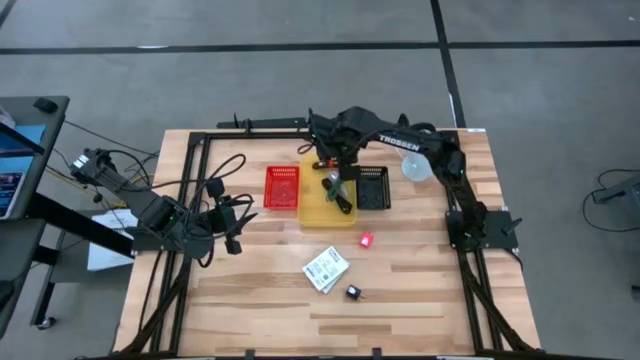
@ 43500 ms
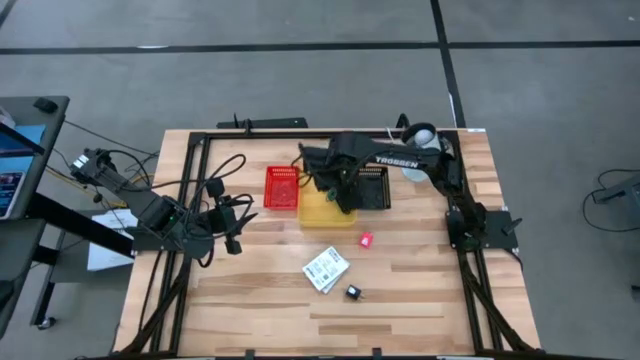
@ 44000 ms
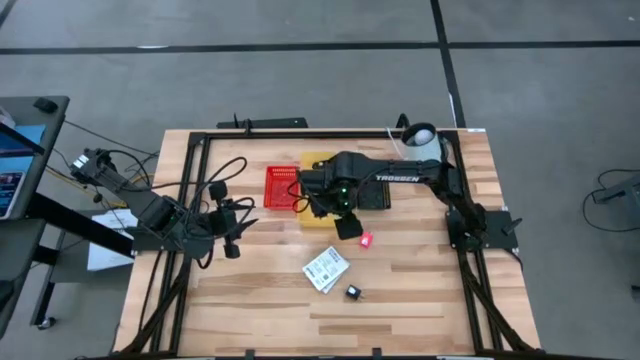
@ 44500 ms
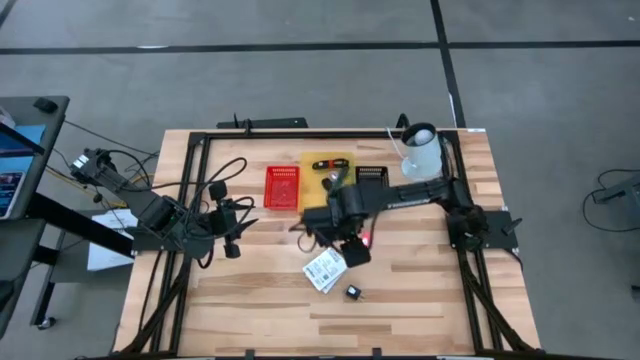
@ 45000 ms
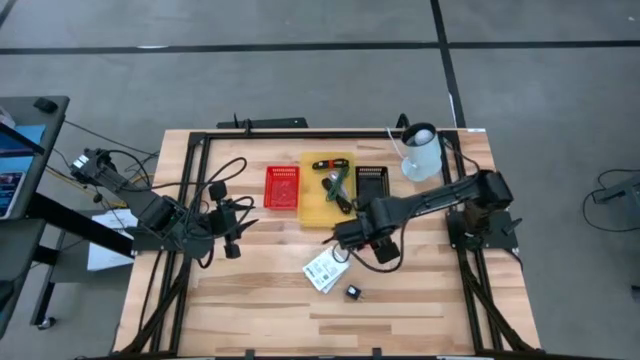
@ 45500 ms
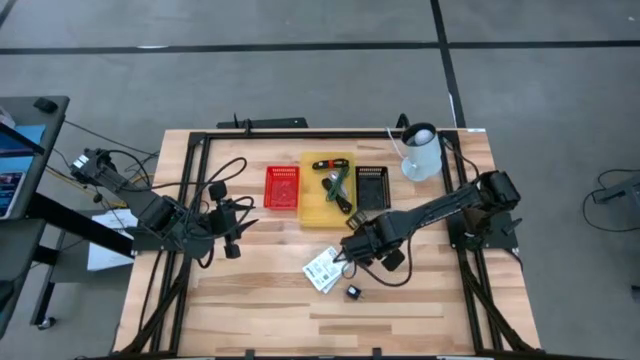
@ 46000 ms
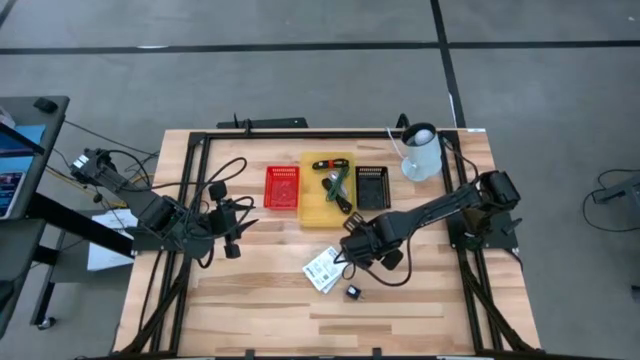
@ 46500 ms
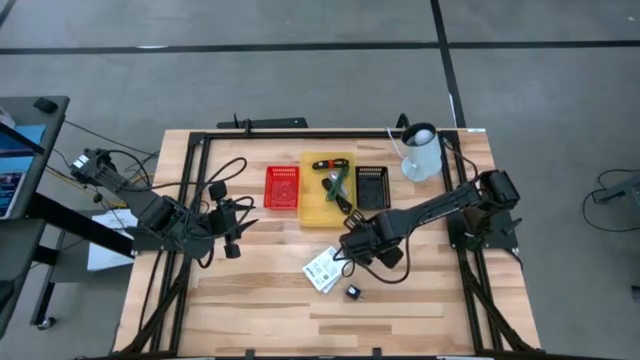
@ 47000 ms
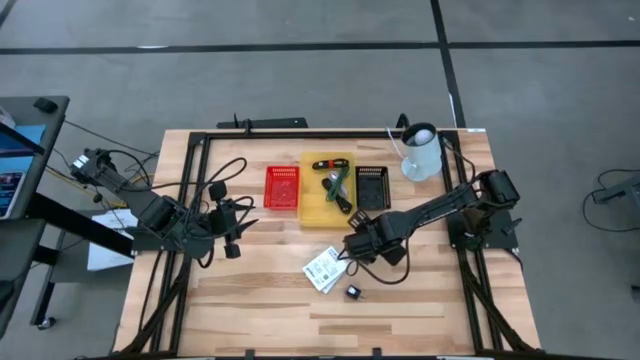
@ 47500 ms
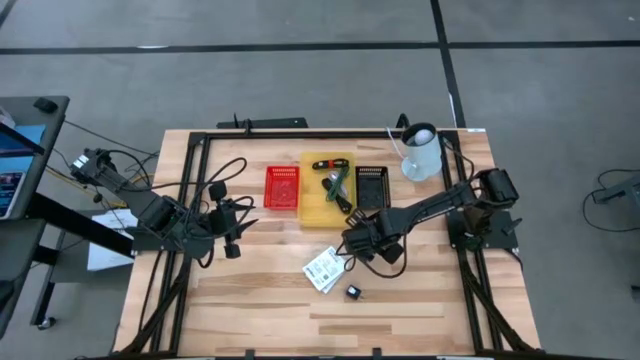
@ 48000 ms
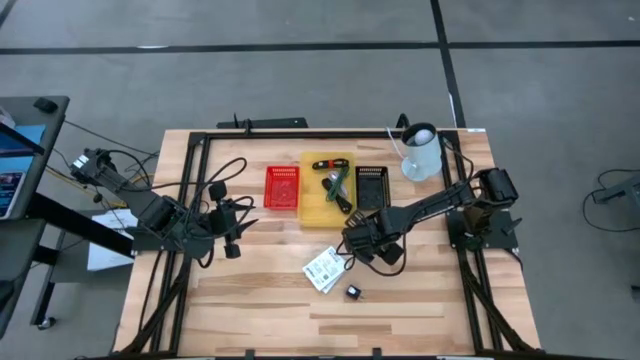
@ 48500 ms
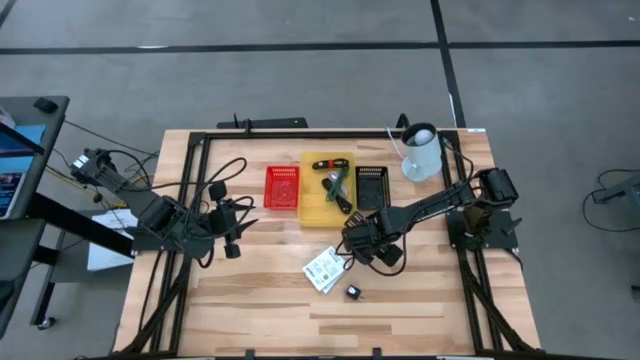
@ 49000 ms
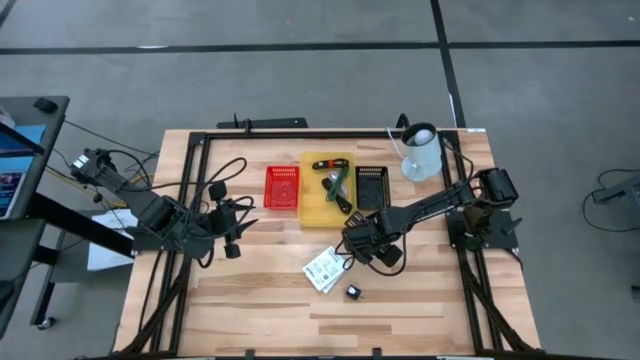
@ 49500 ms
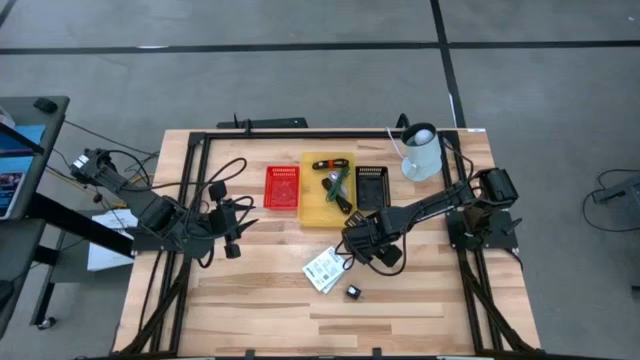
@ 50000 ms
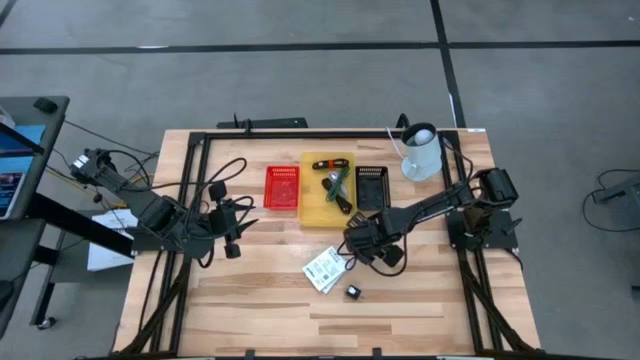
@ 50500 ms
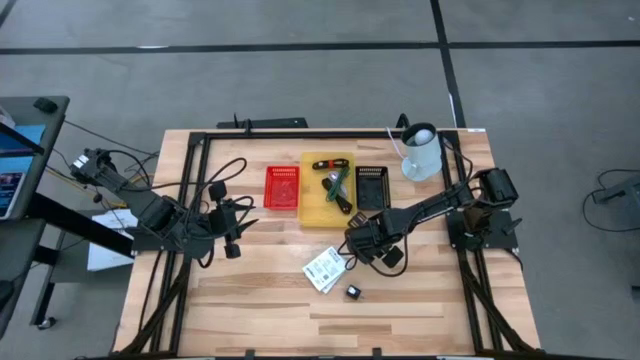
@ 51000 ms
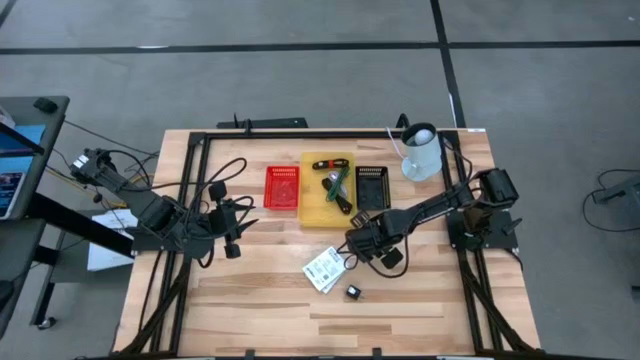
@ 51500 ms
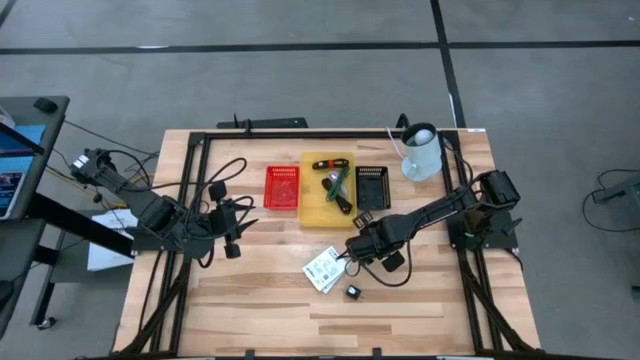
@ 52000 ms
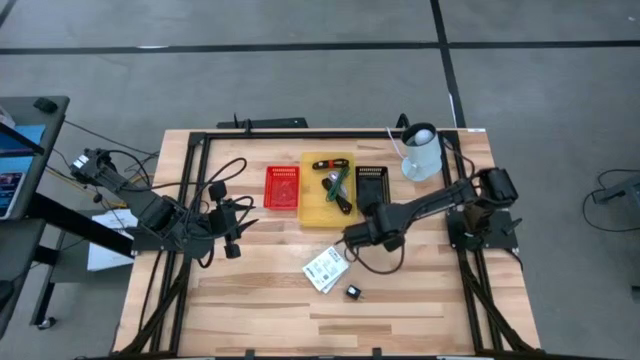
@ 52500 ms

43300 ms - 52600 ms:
Task: Pick and place items into bin
Put the pink charger adapter in the black bin

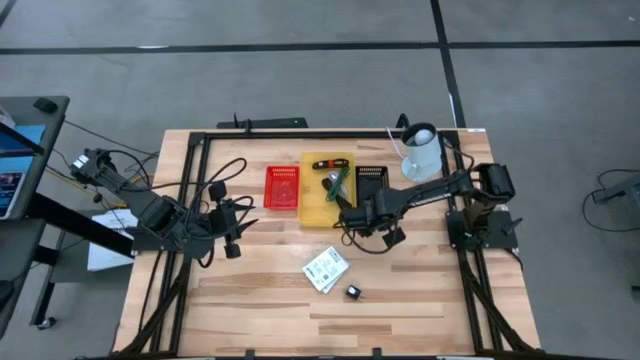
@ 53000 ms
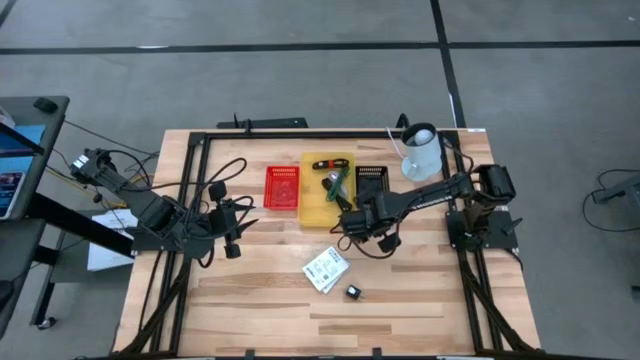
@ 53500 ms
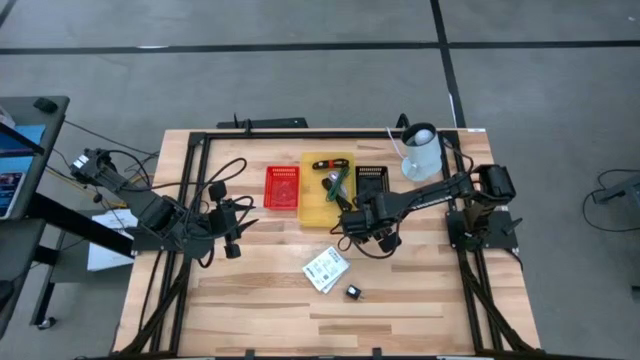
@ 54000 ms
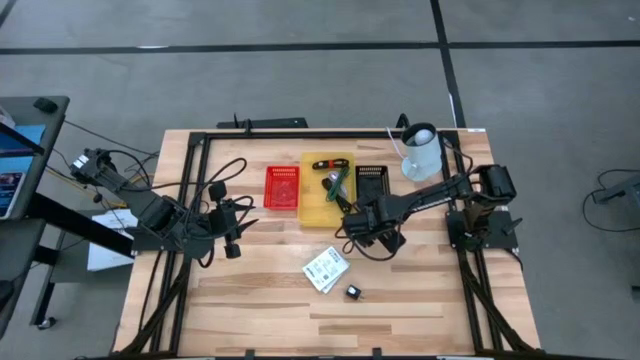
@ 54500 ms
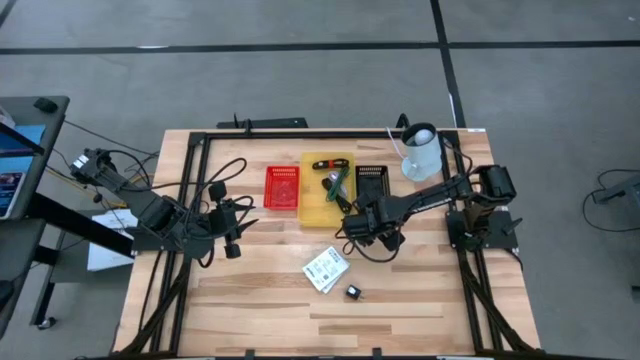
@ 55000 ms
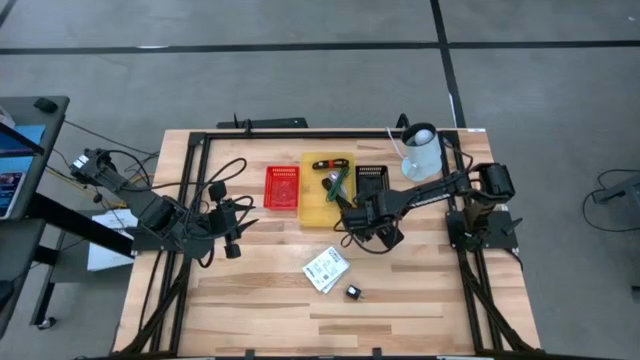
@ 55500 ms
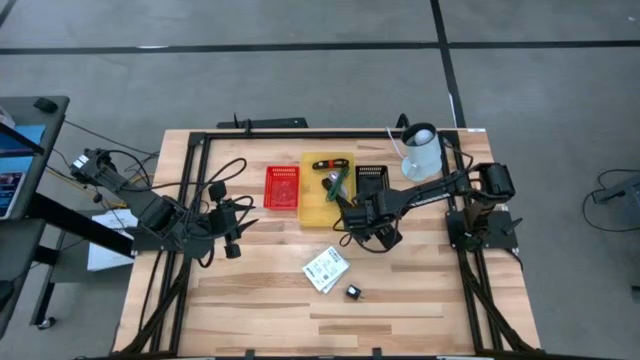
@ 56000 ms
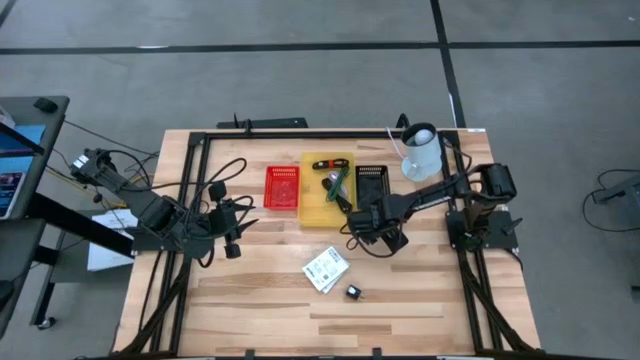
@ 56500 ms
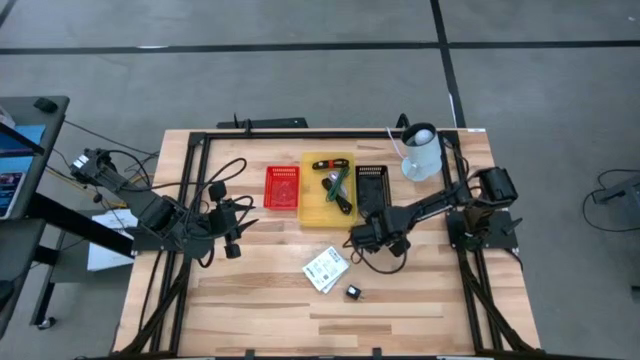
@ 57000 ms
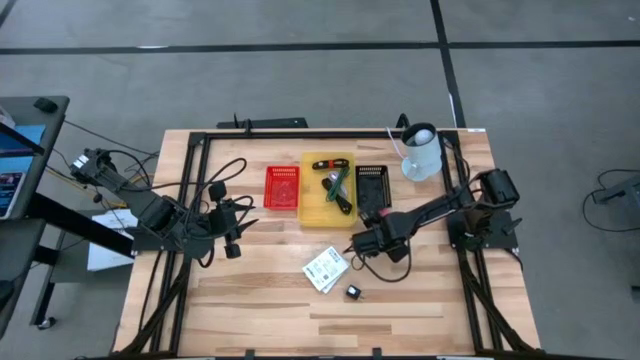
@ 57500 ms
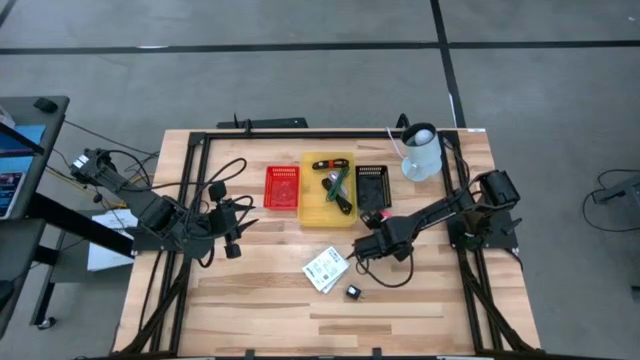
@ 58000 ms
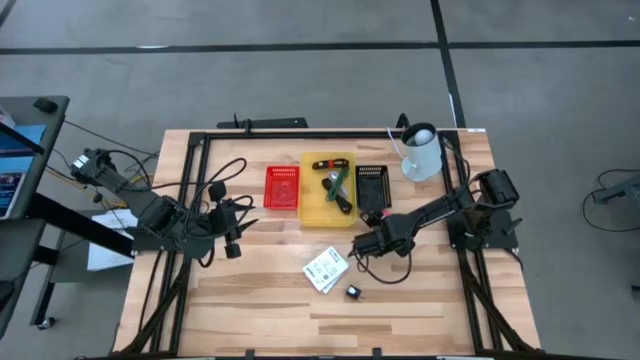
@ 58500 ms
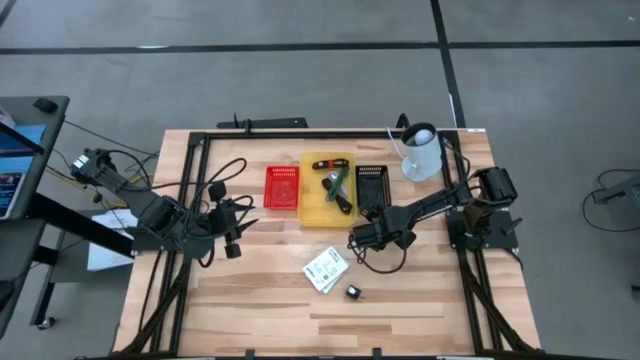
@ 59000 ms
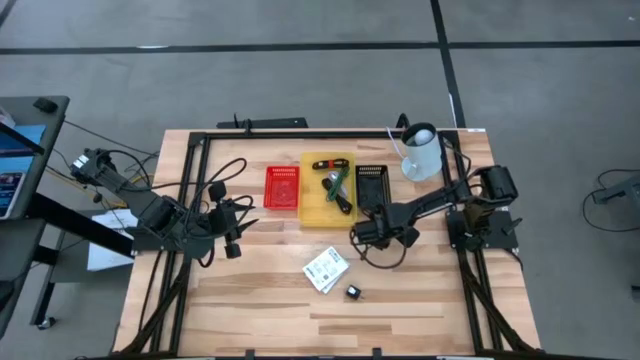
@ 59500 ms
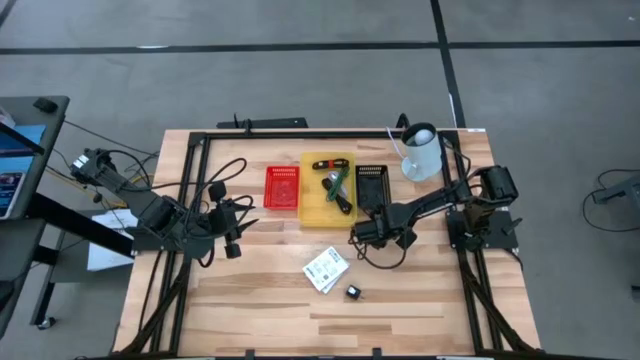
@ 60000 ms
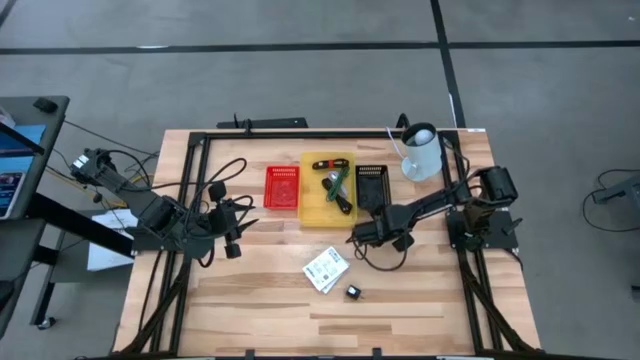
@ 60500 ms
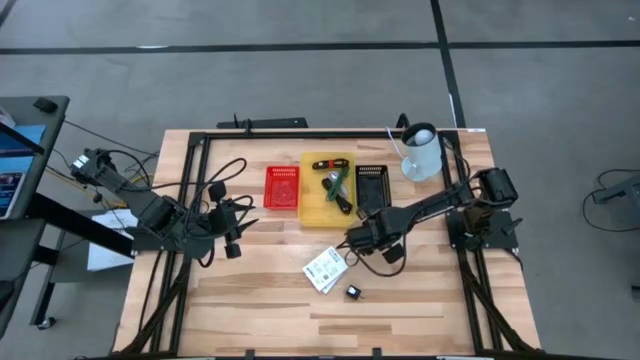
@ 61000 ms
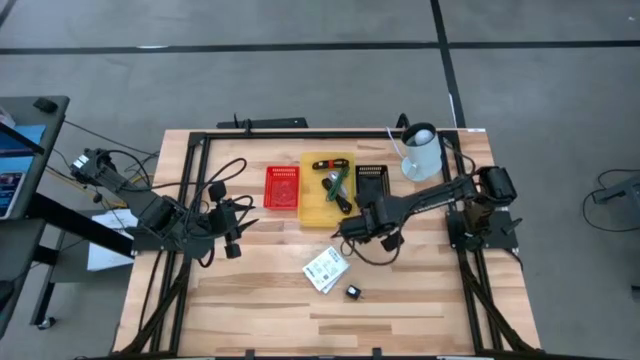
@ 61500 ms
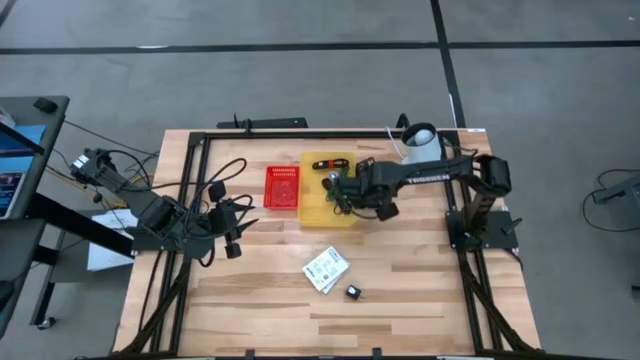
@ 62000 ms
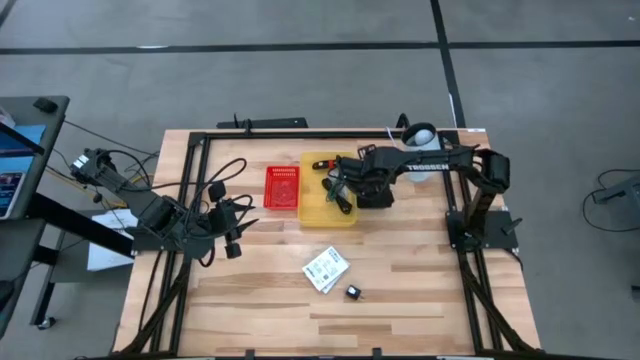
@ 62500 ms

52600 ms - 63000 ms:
Put the pink charger adapter in the black bin

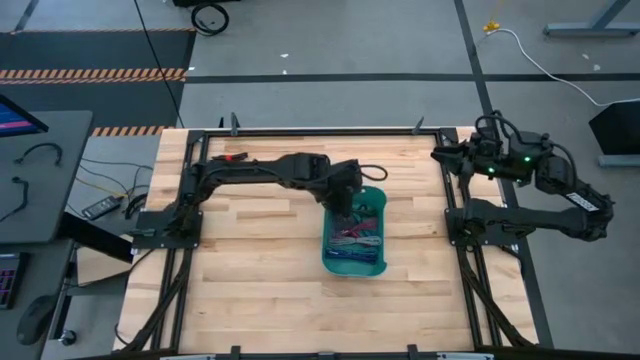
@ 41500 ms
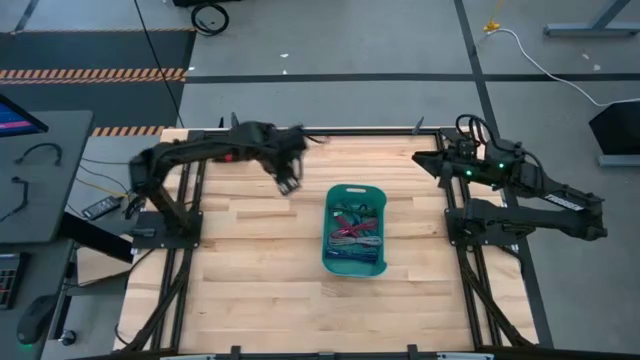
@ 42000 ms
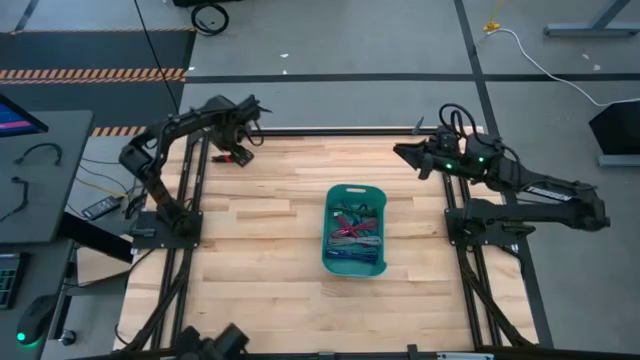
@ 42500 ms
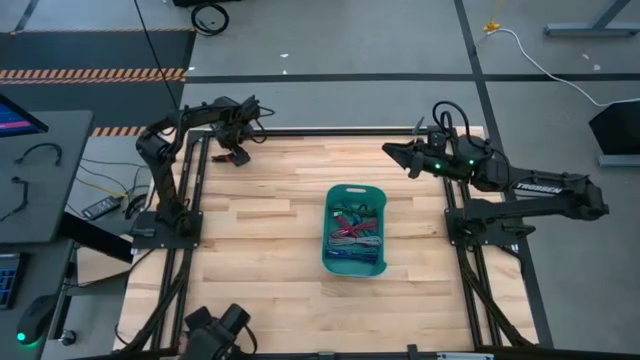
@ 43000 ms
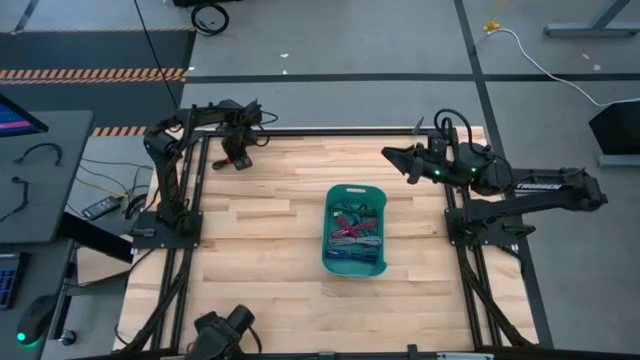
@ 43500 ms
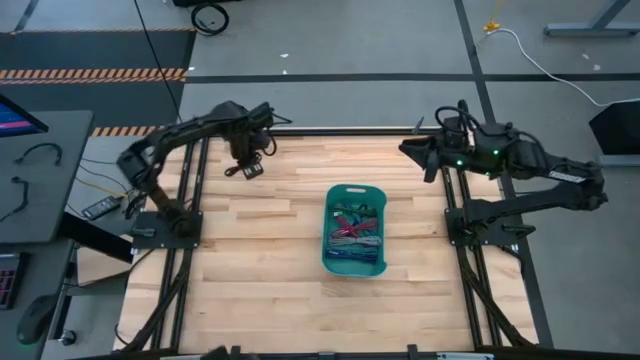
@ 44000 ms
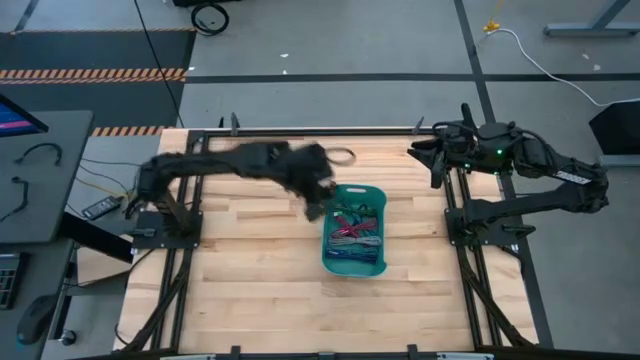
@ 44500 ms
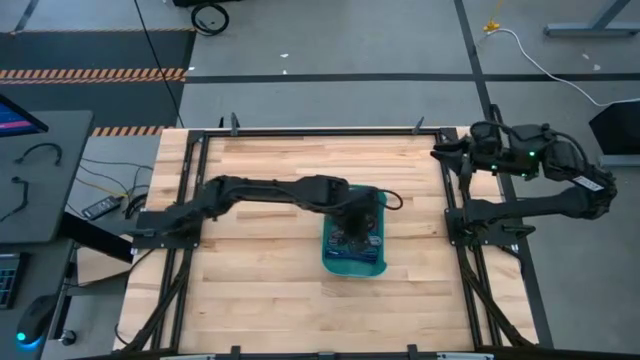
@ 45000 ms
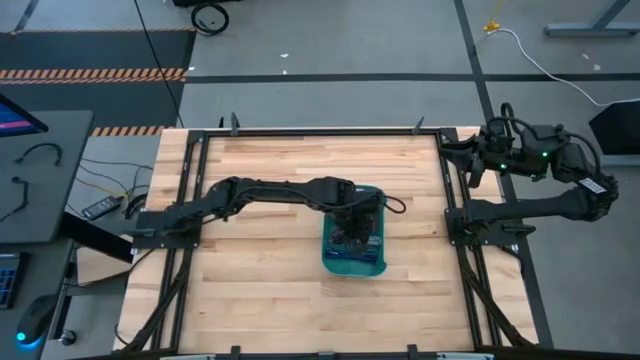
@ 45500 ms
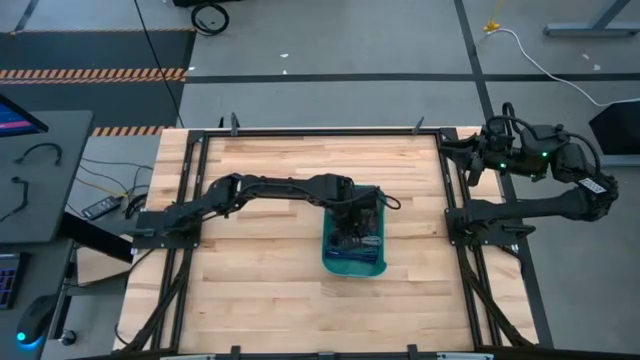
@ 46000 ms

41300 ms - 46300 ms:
Task: Pick and place USB-C Cables
Put the black USB cable into the light green bin
